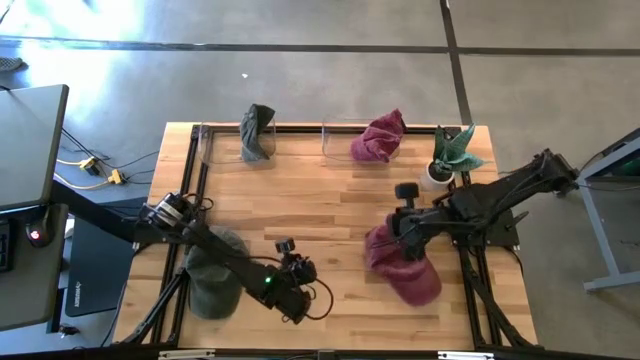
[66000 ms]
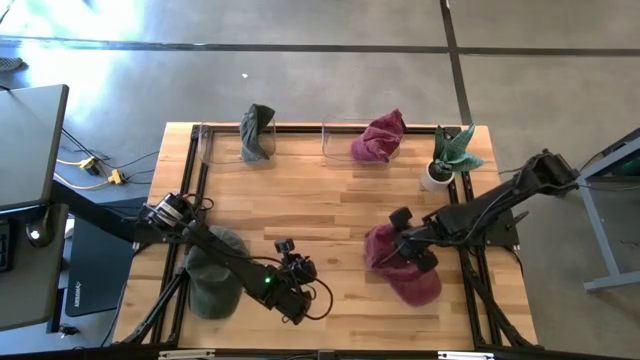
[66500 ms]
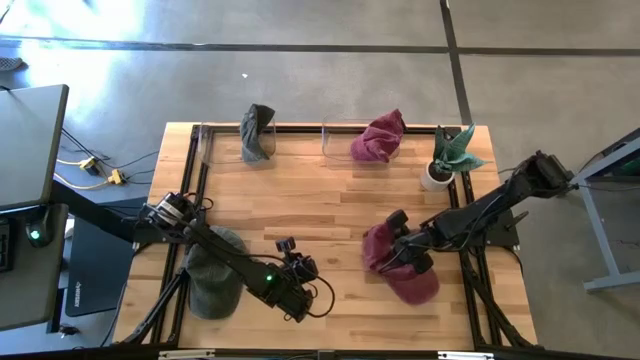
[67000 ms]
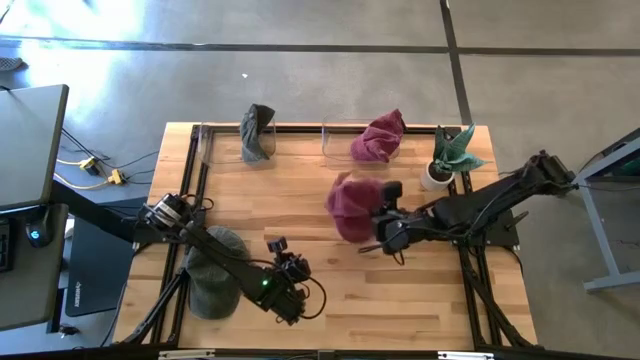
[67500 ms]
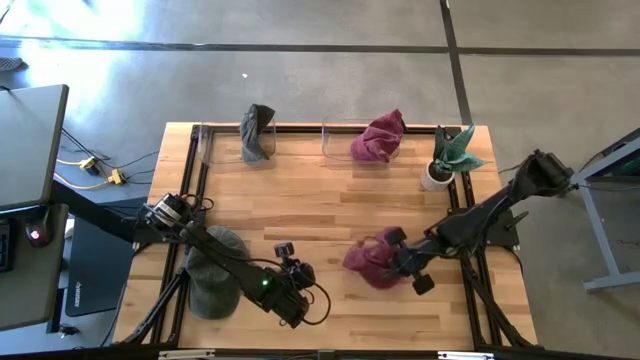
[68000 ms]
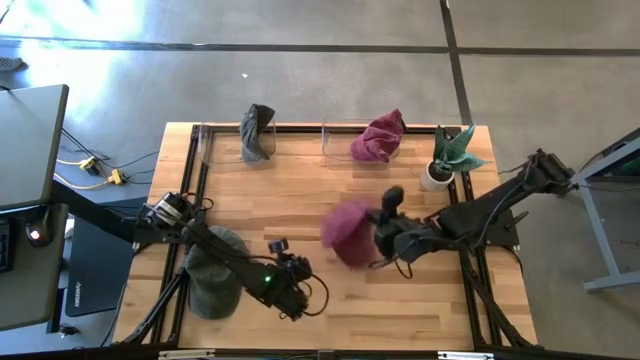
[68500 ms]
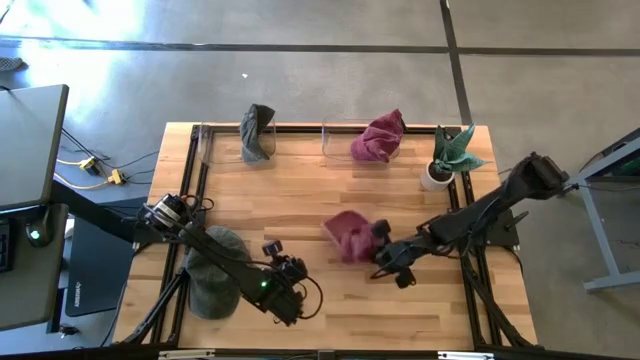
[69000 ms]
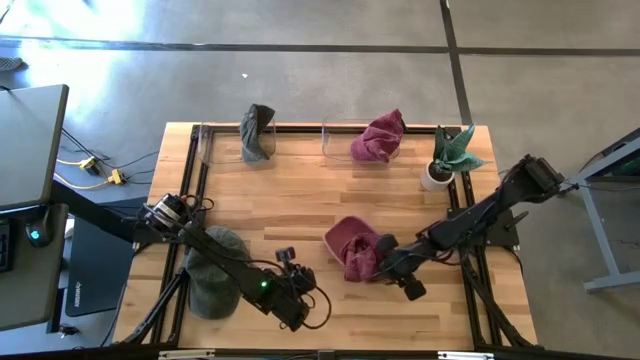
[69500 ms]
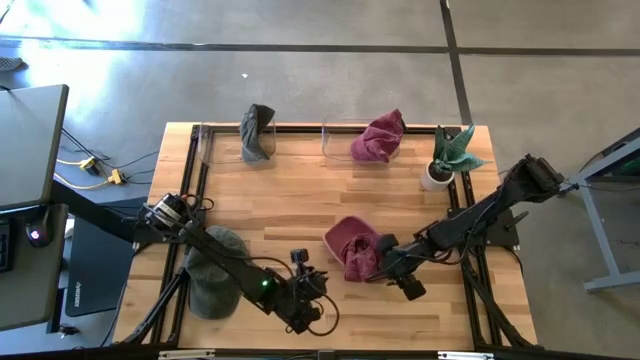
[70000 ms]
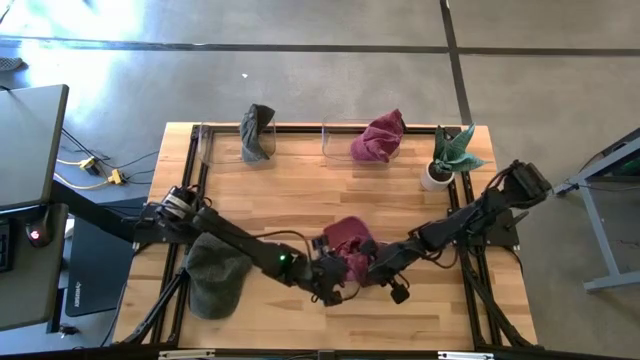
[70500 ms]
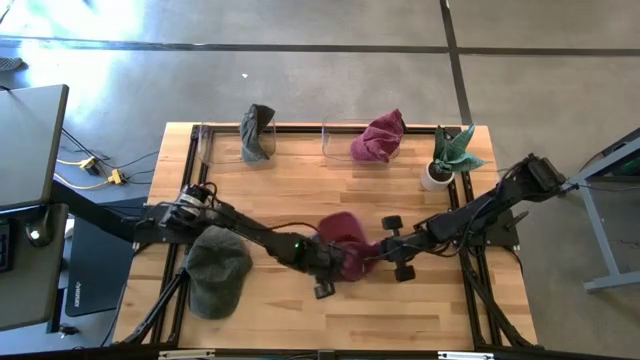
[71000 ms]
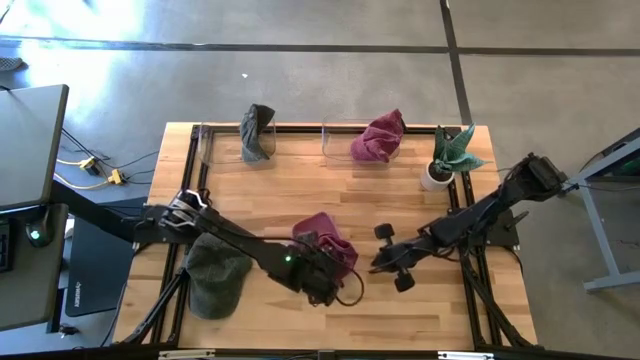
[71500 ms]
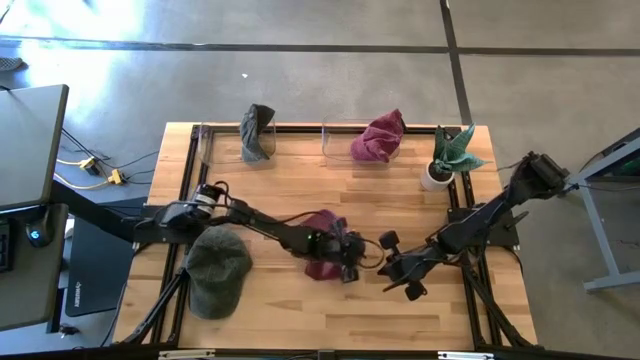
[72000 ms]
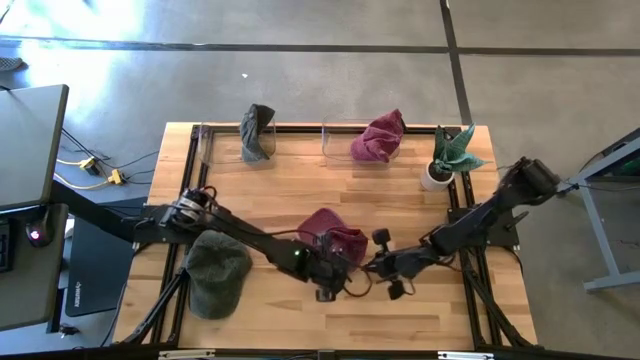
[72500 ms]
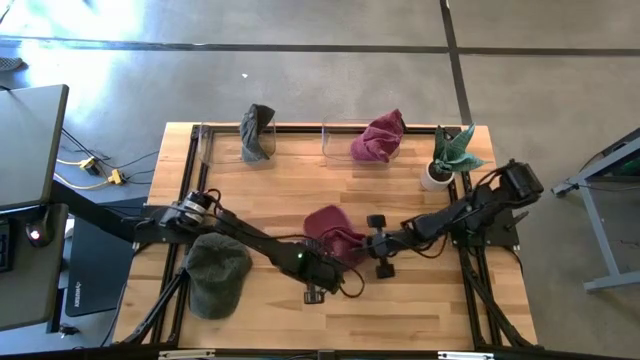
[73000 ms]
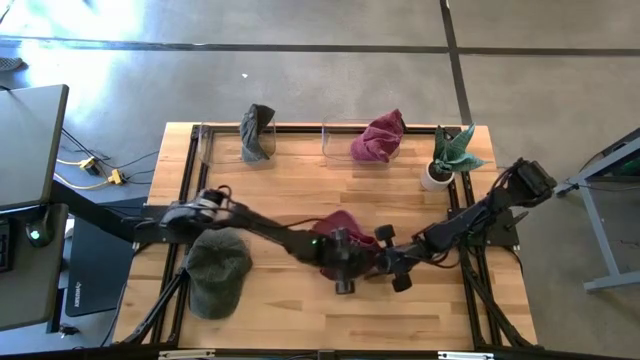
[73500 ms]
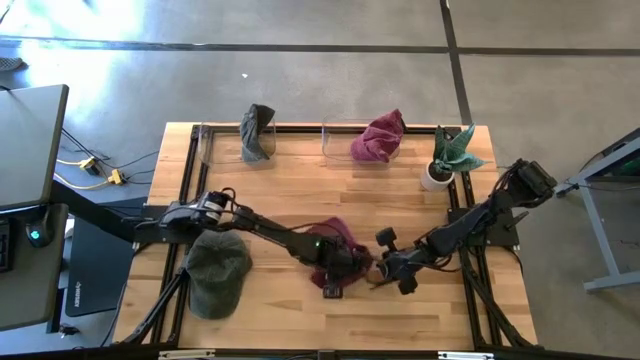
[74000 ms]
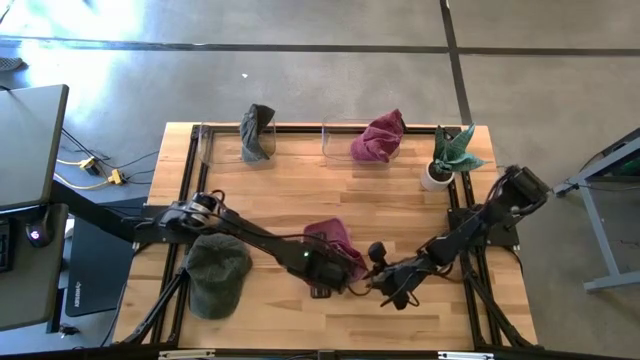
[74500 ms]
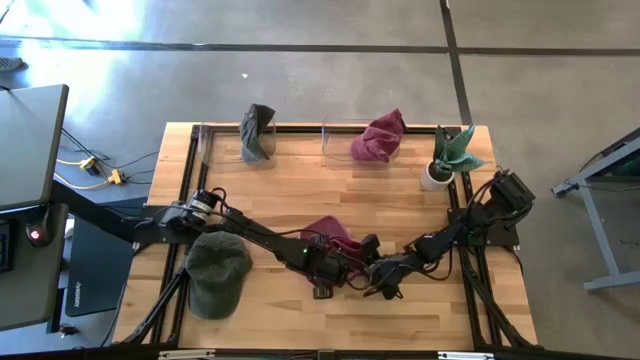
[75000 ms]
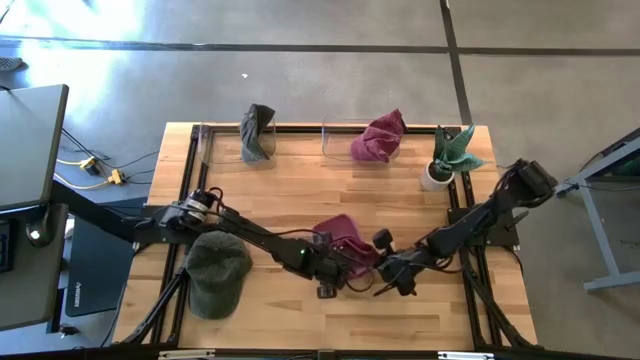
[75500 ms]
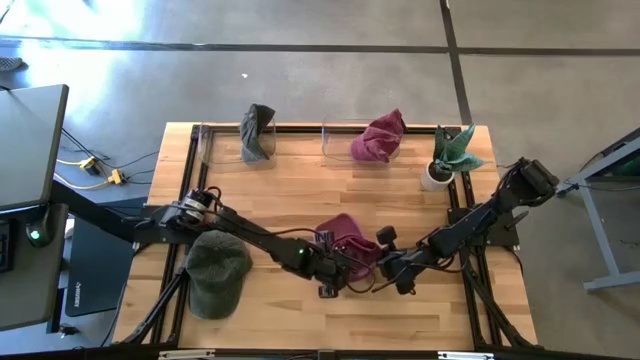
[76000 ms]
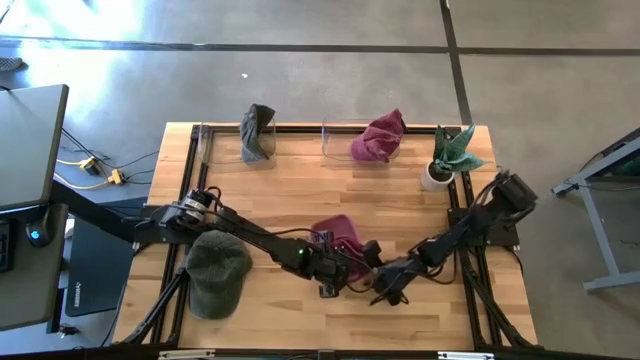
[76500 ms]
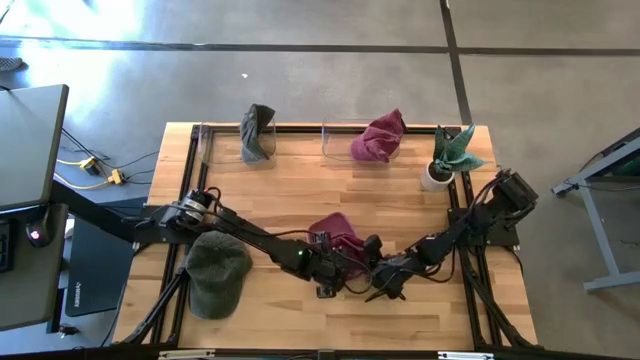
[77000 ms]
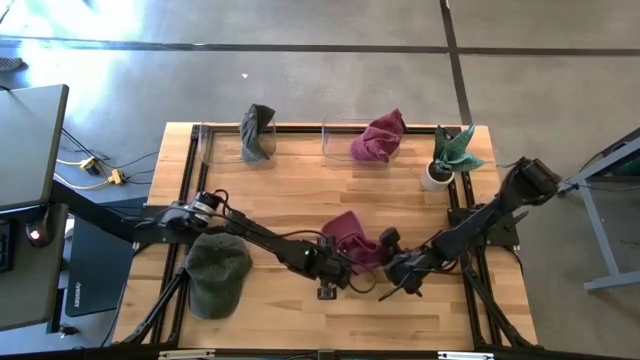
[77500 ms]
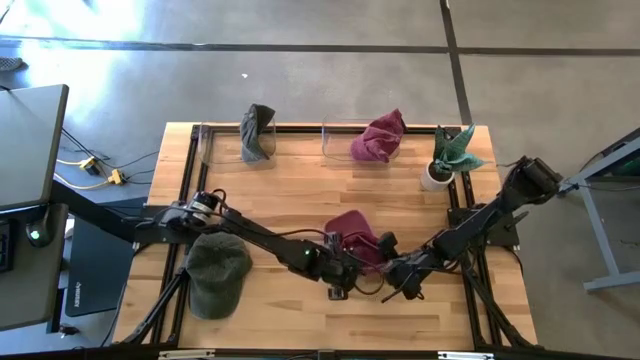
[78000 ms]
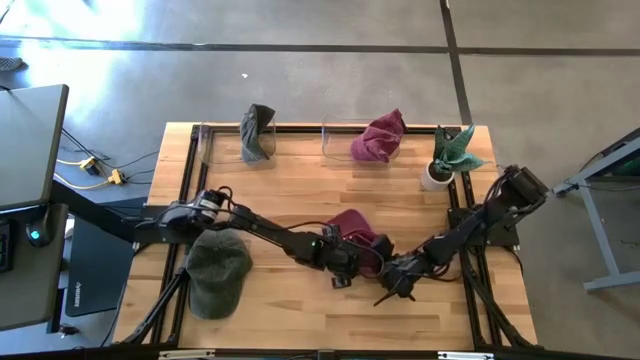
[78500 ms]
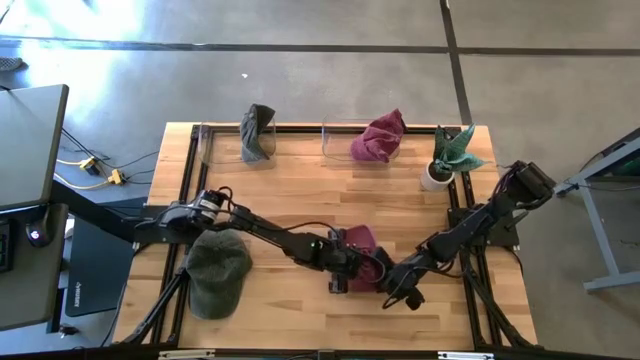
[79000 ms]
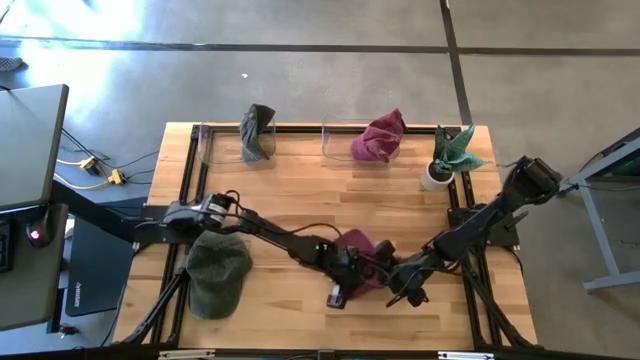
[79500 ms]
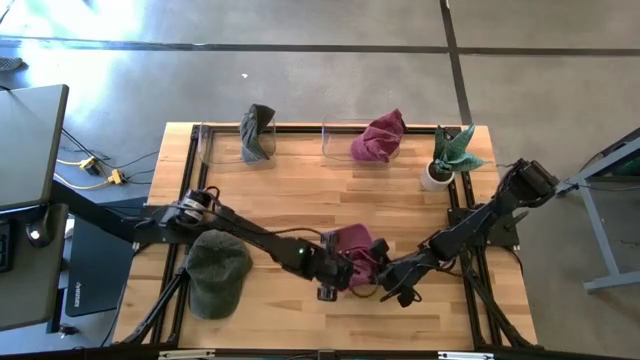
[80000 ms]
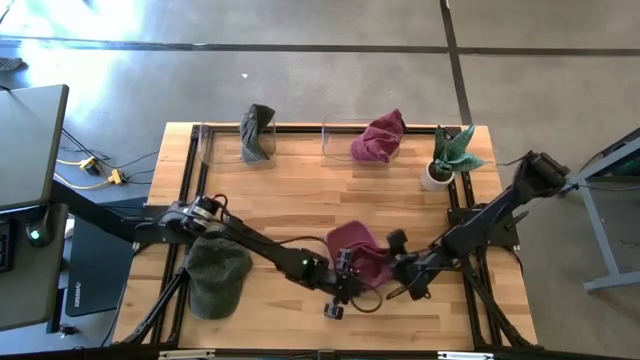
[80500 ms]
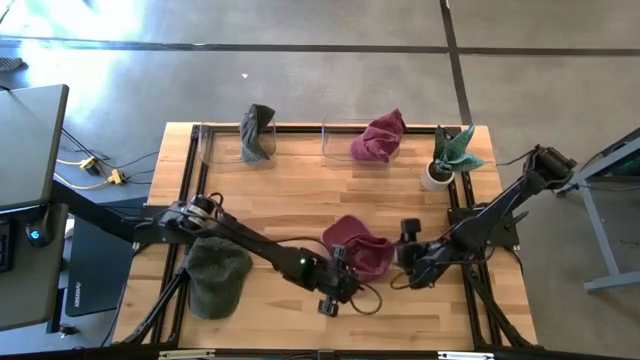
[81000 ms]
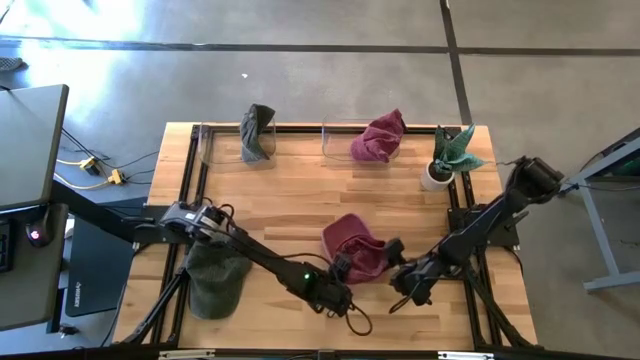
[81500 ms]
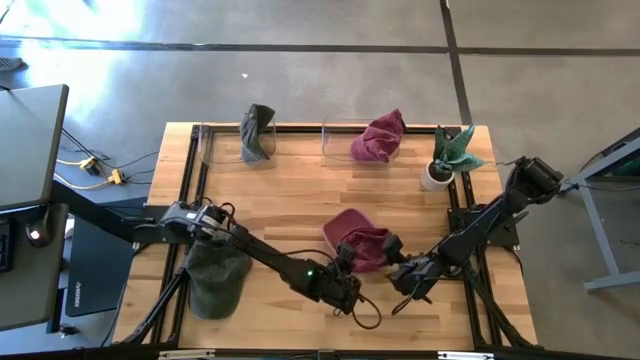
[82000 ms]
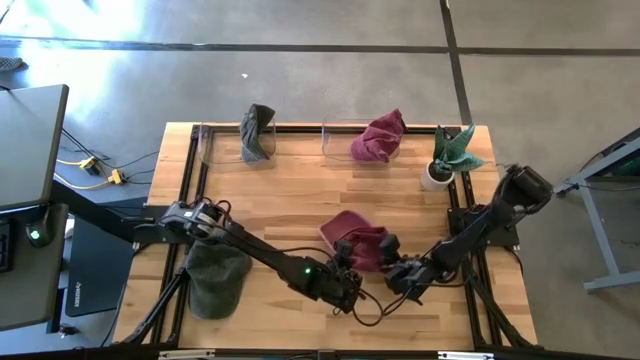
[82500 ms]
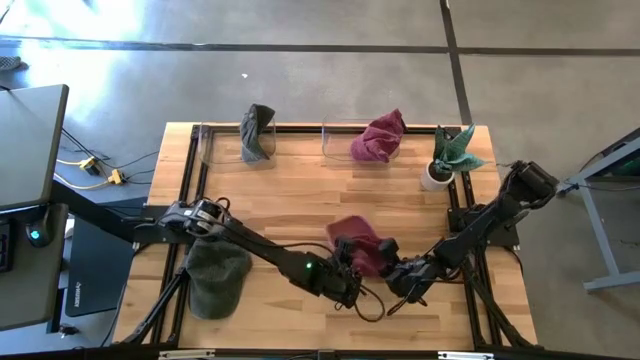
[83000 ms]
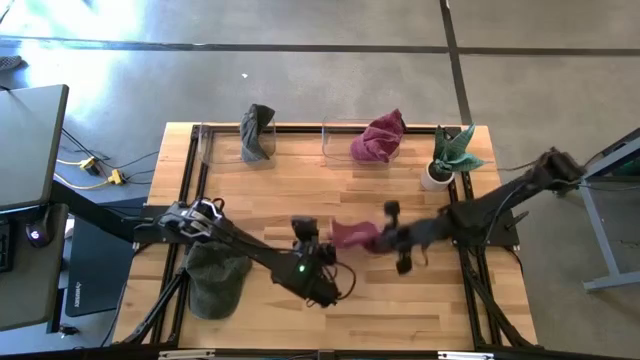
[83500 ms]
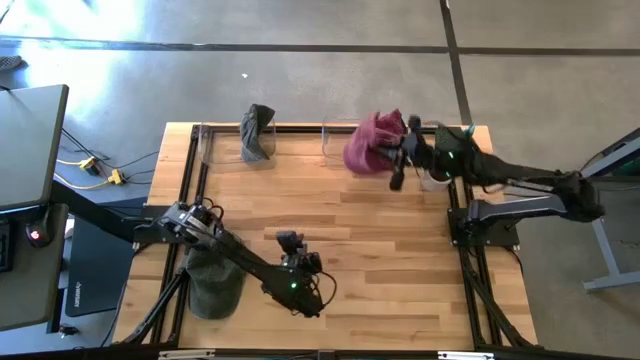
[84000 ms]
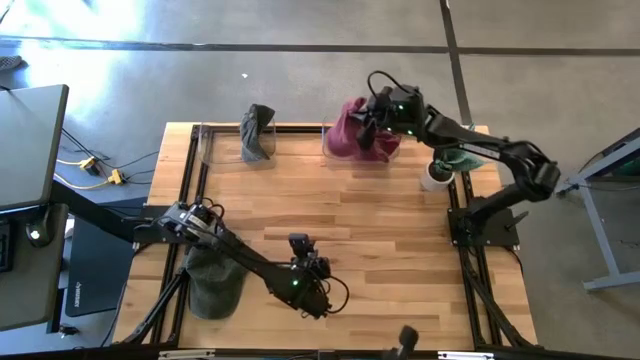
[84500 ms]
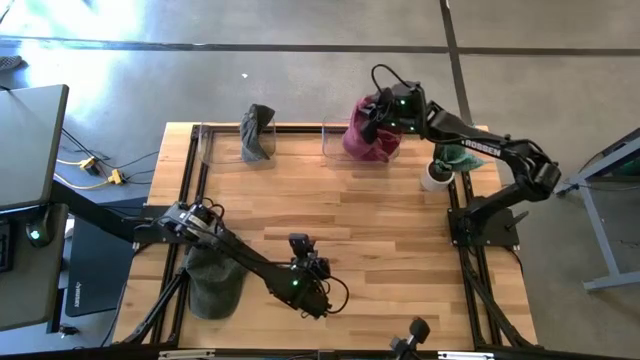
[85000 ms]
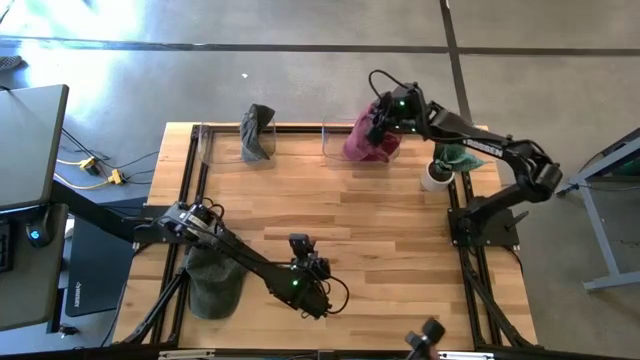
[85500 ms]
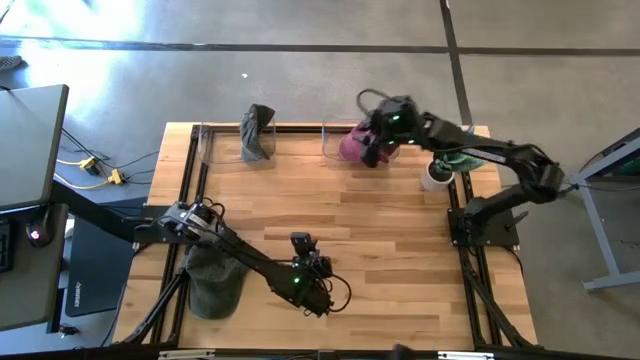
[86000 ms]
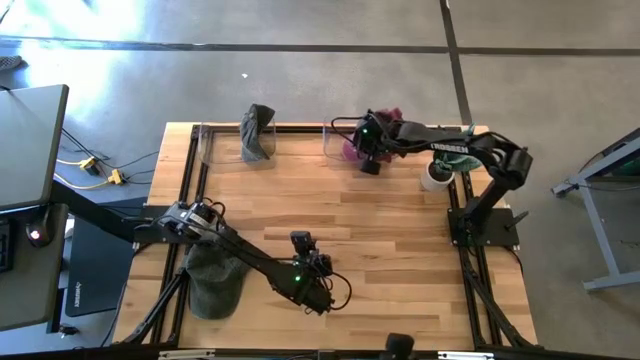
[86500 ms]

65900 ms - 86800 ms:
Task: Pick & Place hat
Put the red cap into the left transparent bin

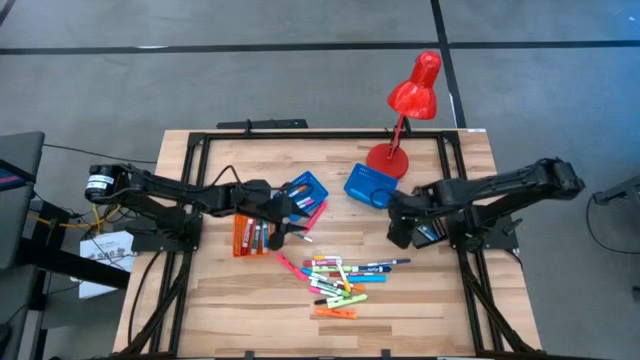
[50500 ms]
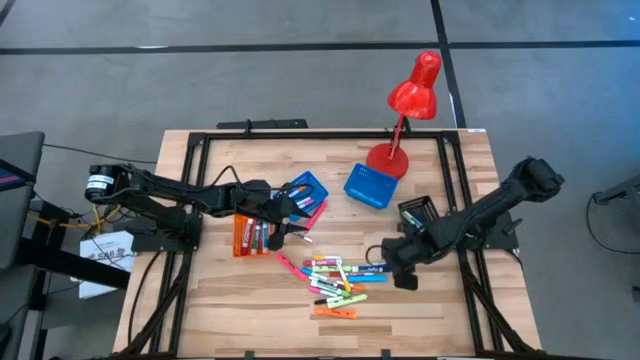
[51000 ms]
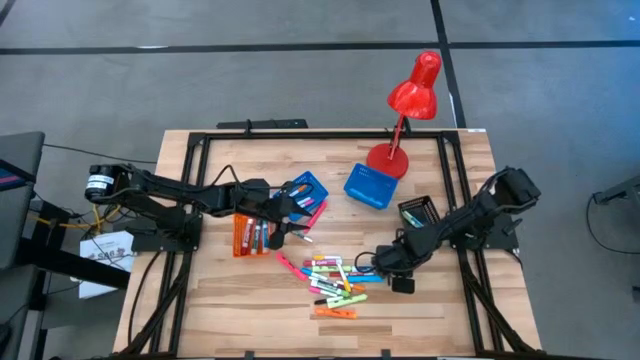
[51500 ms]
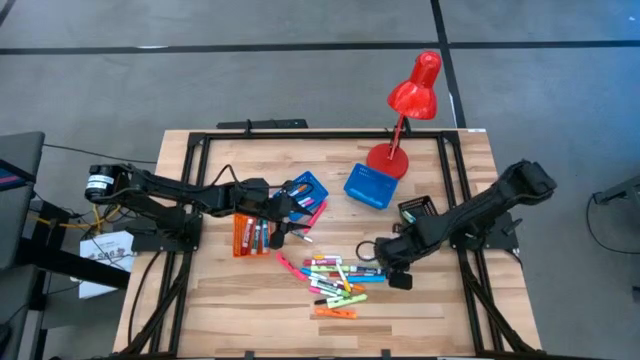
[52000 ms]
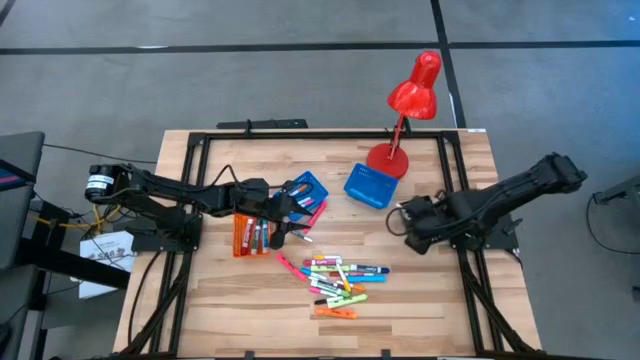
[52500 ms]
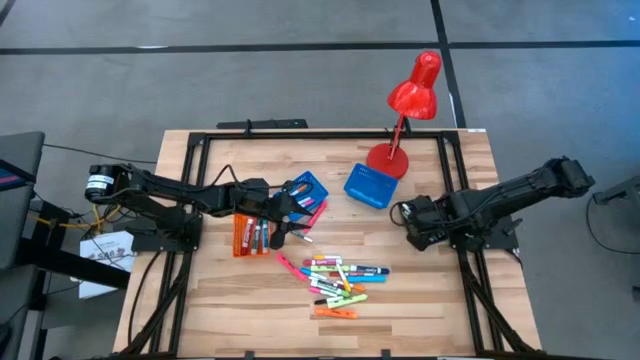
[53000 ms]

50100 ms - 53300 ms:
Task: Pick & Place Markers
Put the small dark blue marker pen into the black bin
